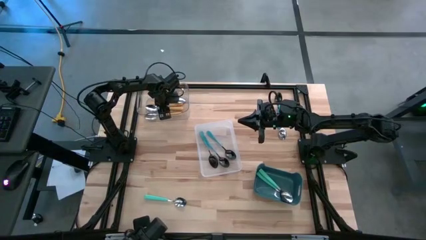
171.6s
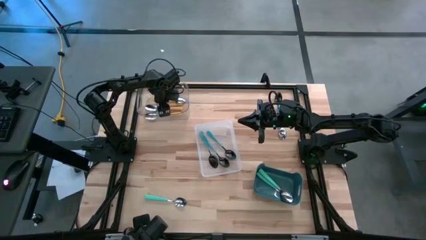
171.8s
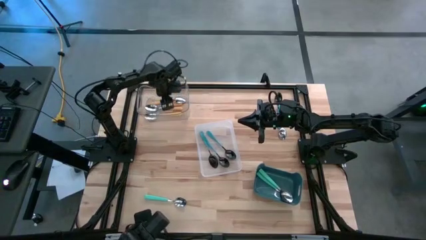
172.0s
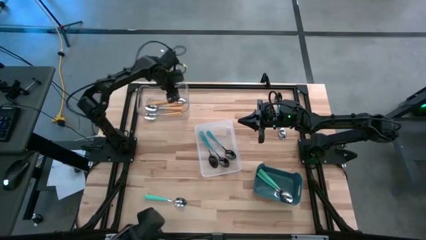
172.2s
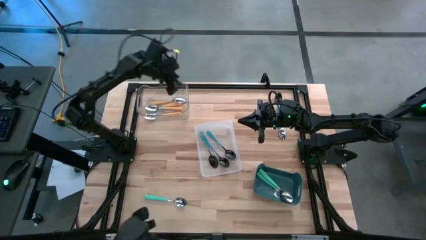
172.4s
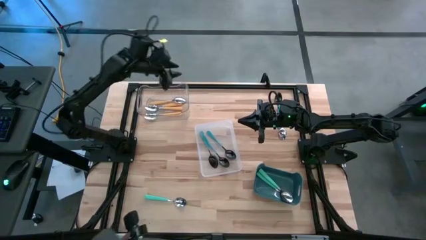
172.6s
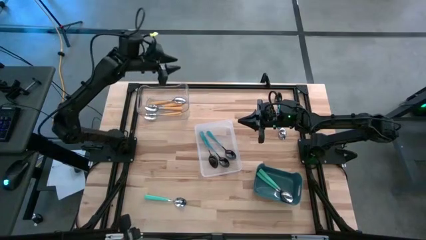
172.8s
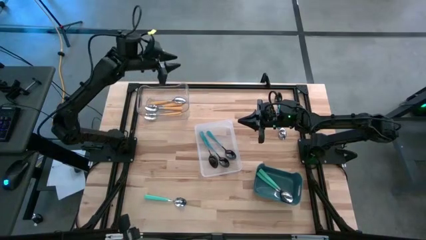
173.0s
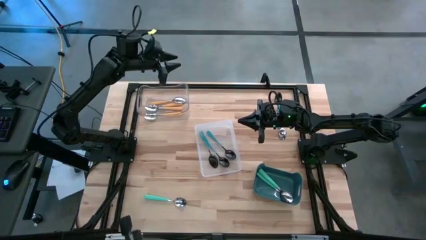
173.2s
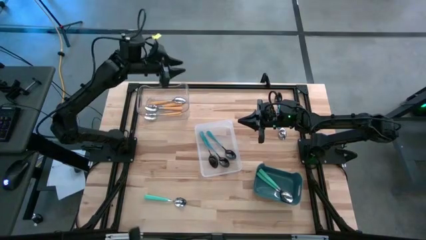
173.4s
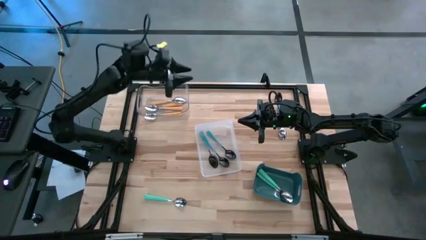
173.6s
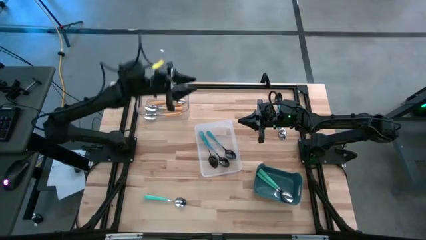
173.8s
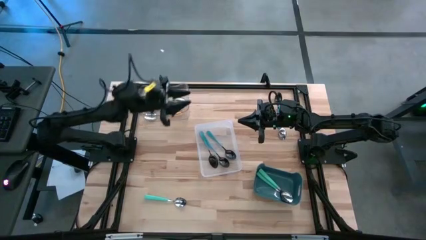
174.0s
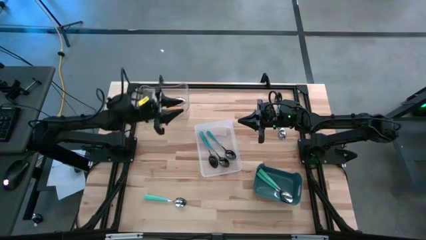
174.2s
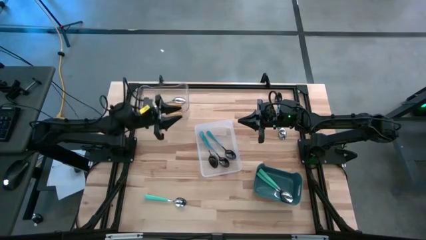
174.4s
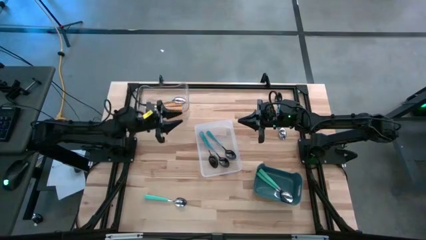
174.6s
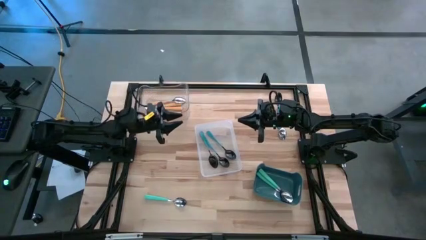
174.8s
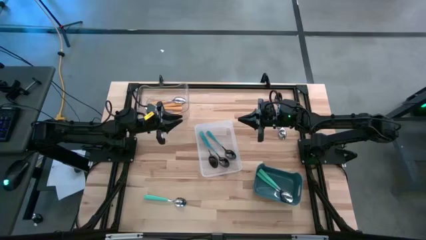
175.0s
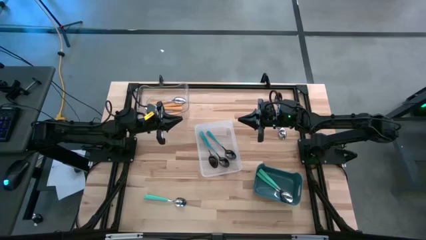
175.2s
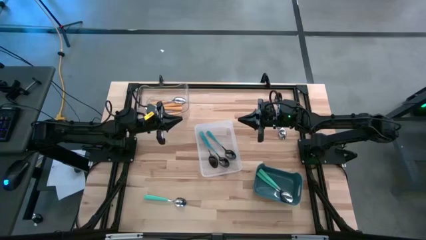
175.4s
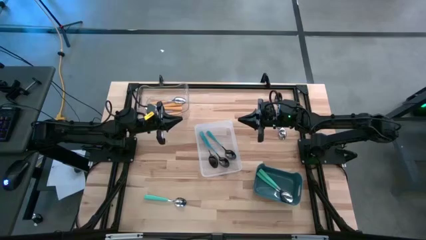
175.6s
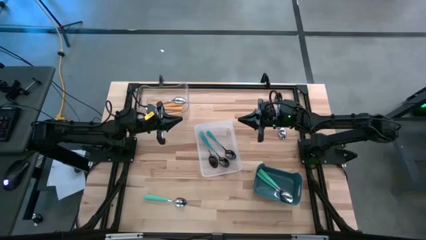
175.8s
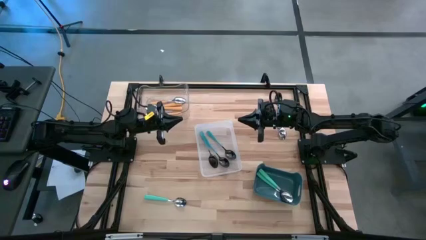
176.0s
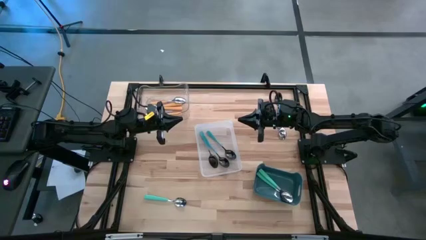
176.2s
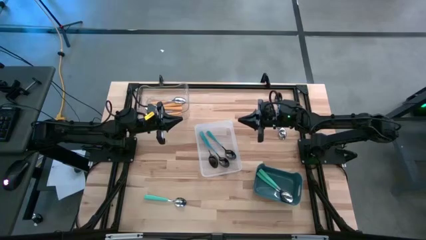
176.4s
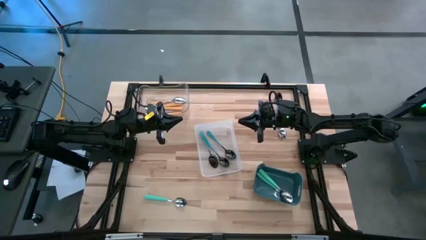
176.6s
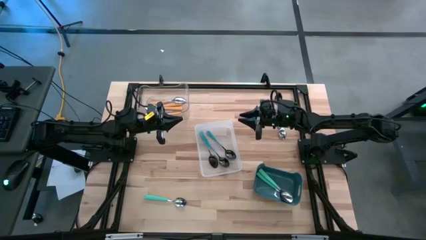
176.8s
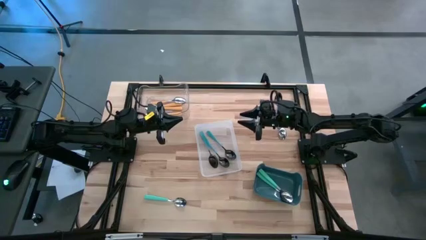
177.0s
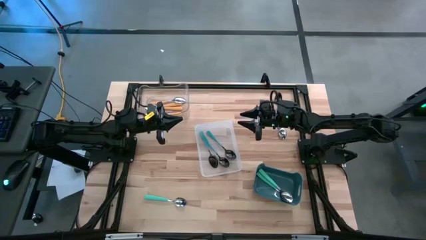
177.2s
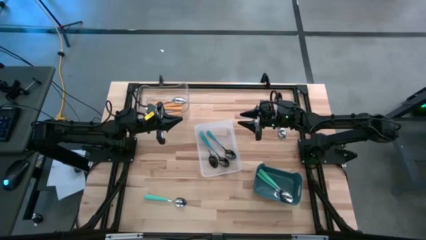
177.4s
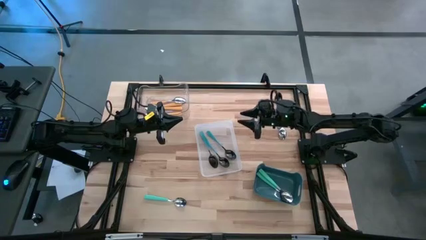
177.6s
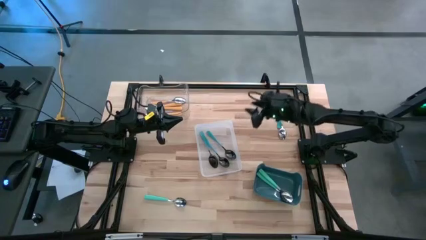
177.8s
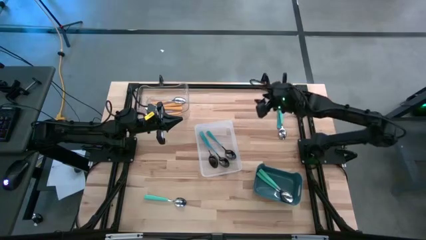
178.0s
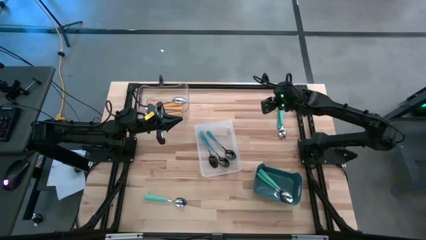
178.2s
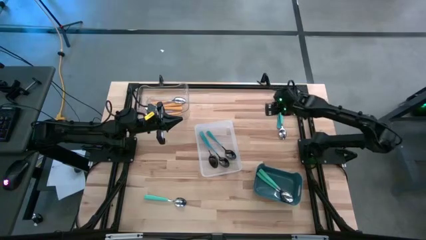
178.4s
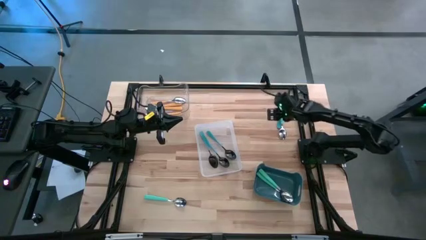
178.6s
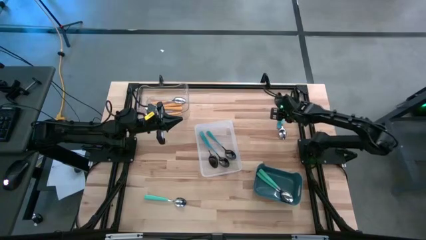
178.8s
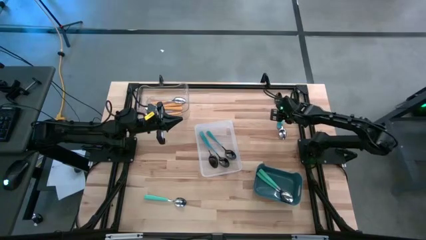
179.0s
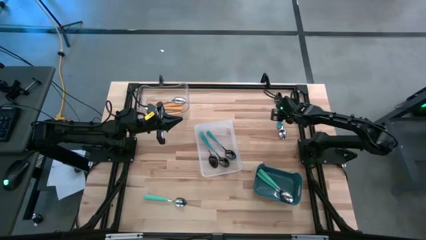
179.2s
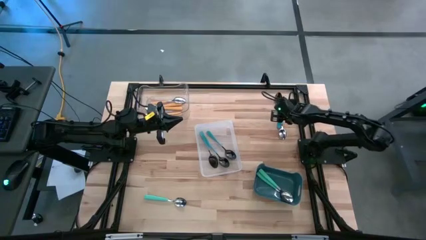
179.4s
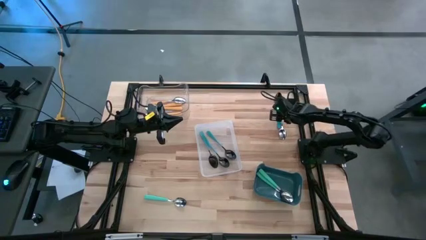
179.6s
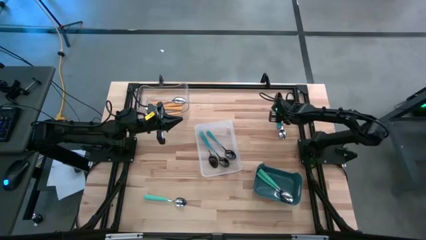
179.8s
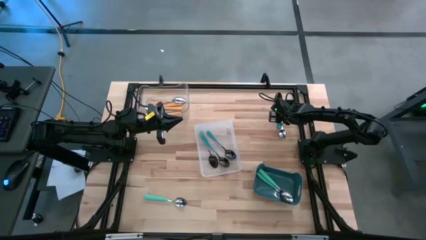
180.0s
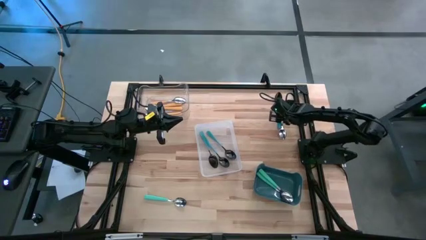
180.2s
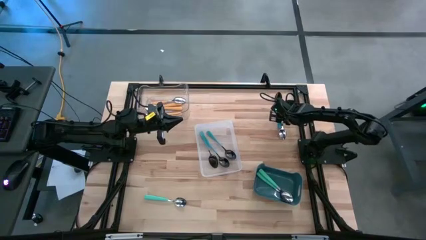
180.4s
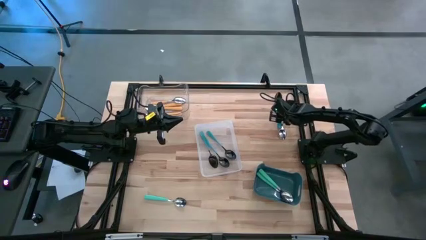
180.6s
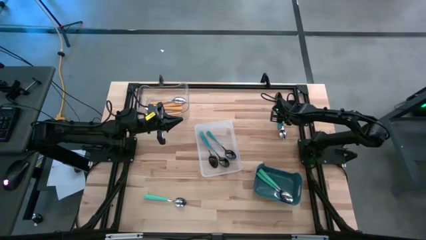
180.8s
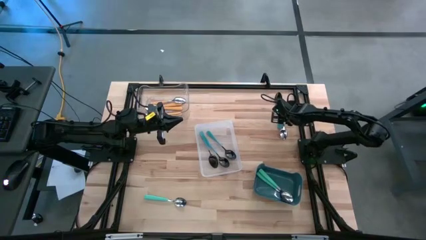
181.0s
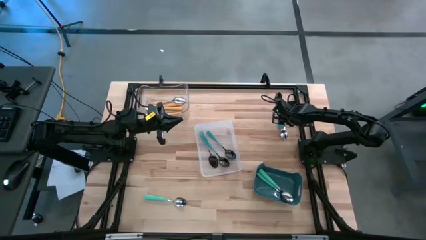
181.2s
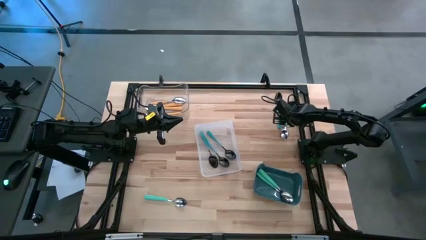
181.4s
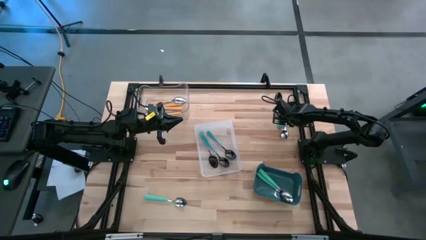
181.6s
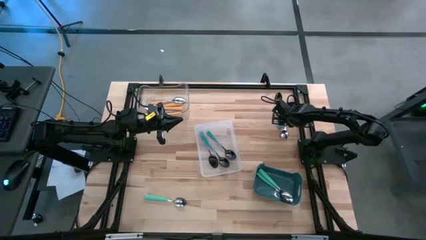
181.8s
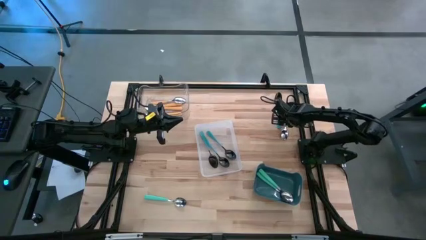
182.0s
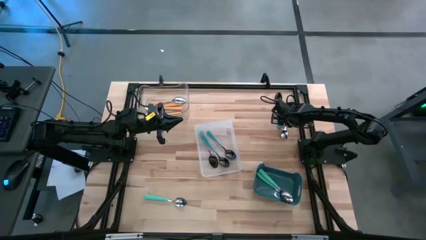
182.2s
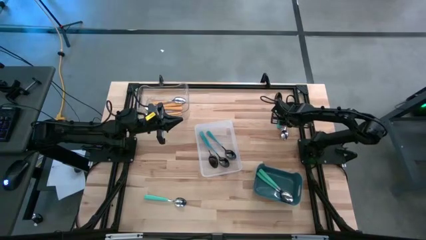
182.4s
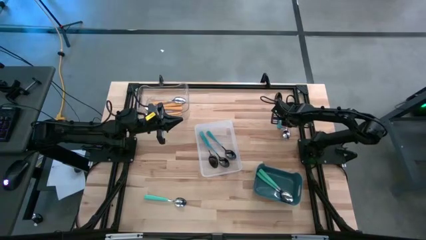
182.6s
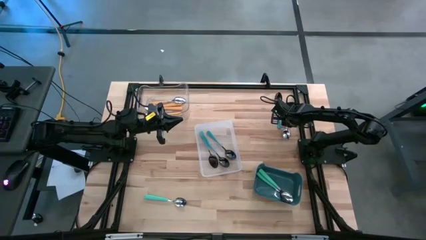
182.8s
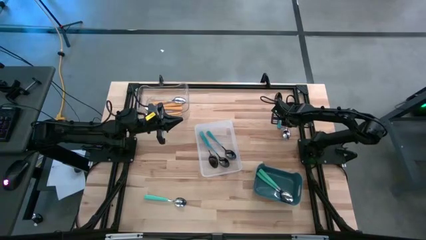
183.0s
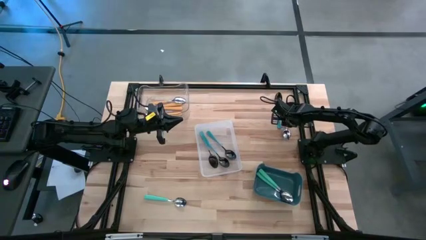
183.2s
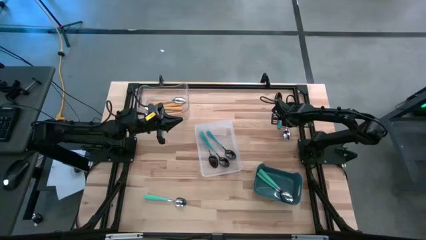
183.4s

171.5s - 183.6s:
Task: Sort silverware by color (type)
Put the light blue spoon into the blue bin
